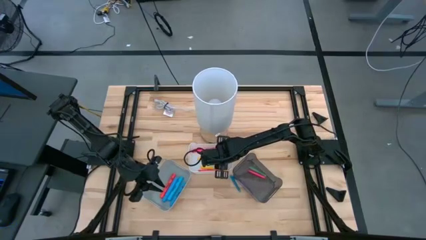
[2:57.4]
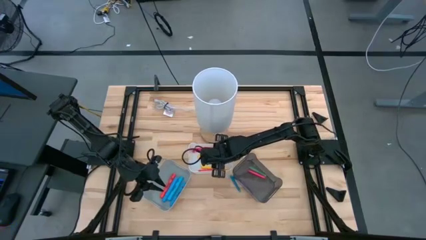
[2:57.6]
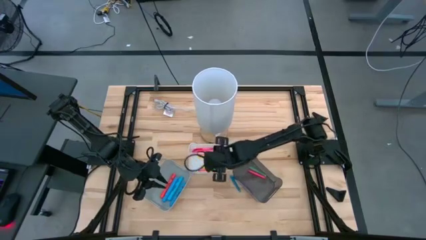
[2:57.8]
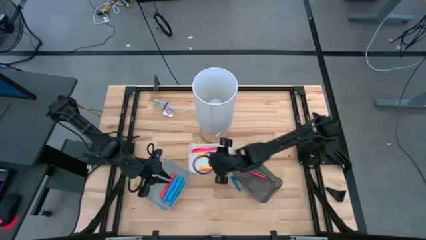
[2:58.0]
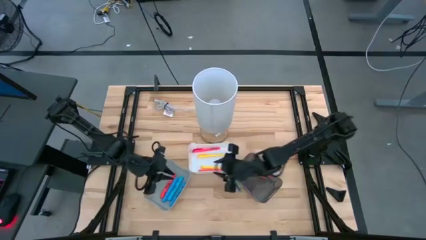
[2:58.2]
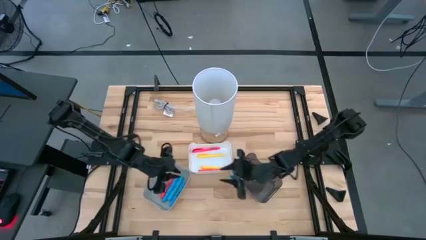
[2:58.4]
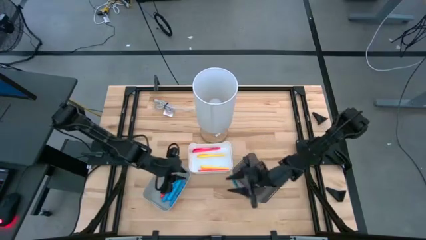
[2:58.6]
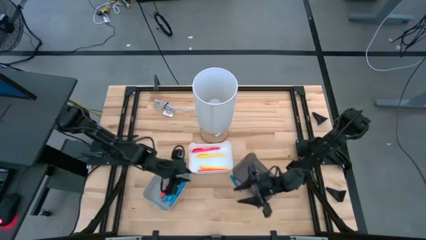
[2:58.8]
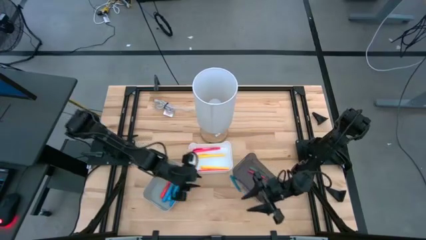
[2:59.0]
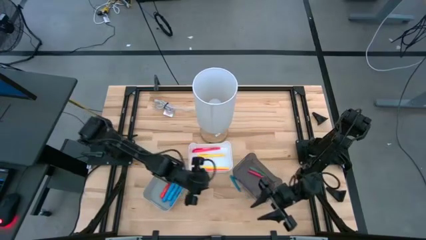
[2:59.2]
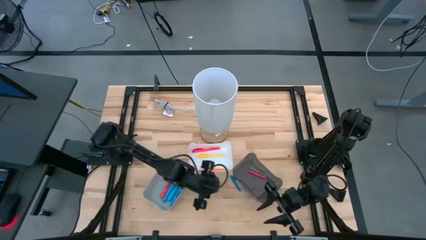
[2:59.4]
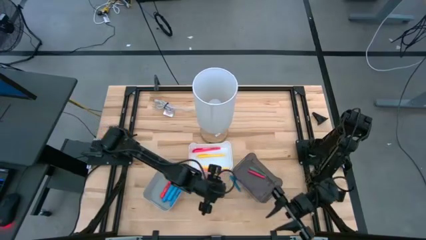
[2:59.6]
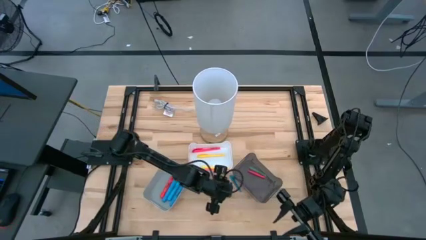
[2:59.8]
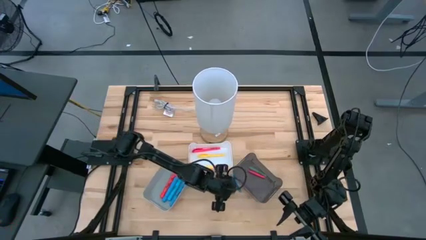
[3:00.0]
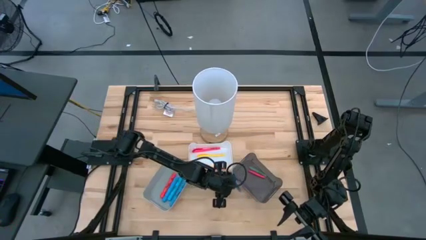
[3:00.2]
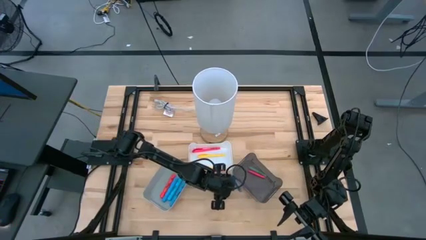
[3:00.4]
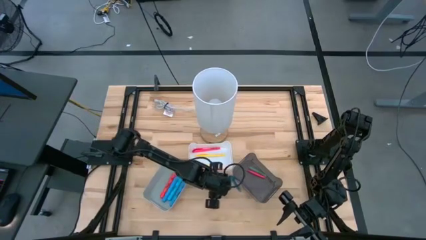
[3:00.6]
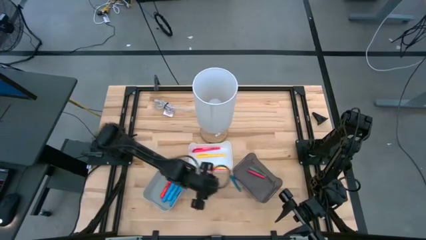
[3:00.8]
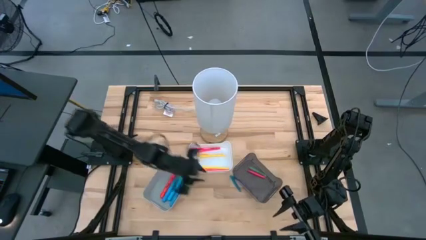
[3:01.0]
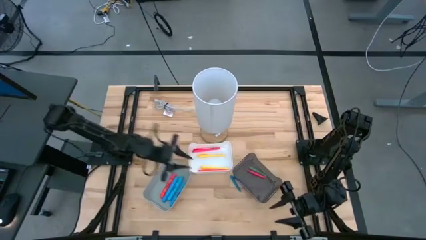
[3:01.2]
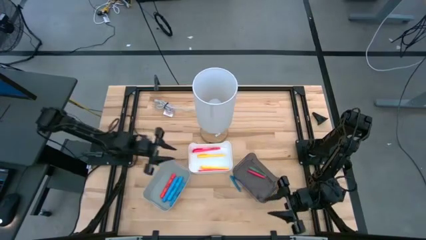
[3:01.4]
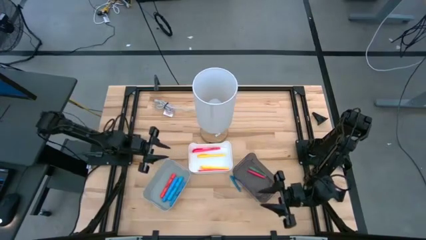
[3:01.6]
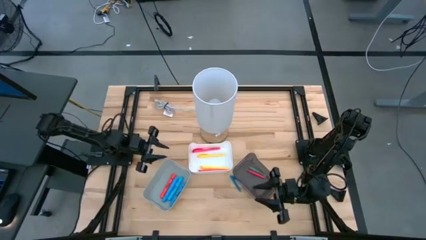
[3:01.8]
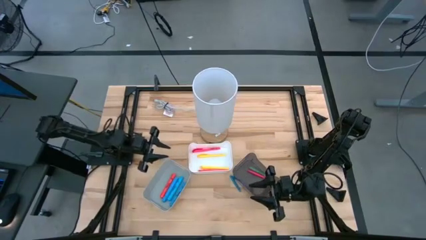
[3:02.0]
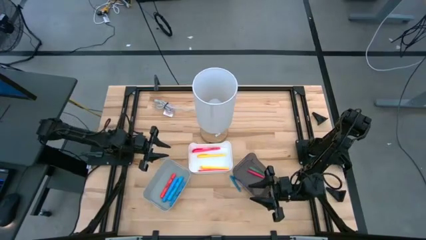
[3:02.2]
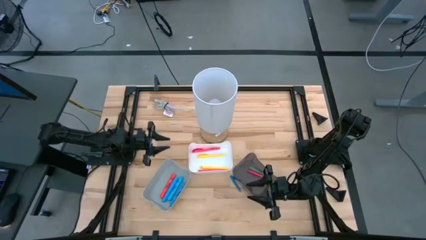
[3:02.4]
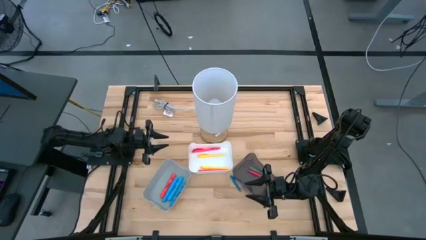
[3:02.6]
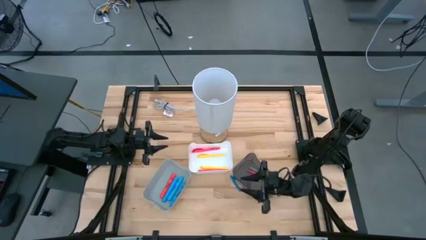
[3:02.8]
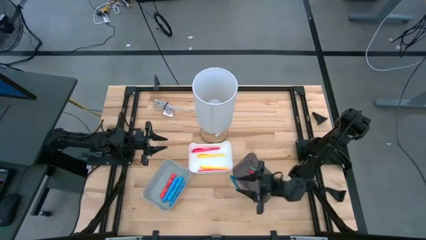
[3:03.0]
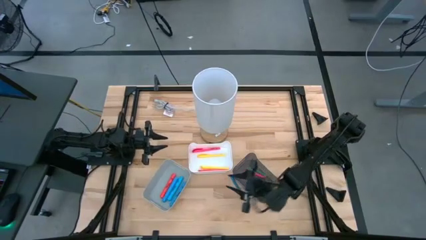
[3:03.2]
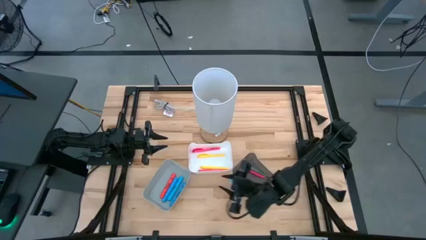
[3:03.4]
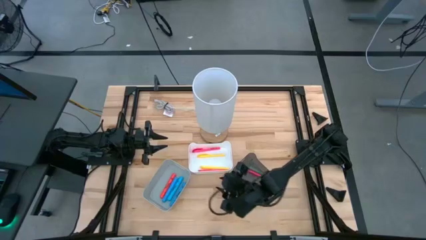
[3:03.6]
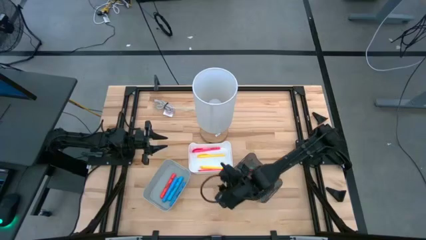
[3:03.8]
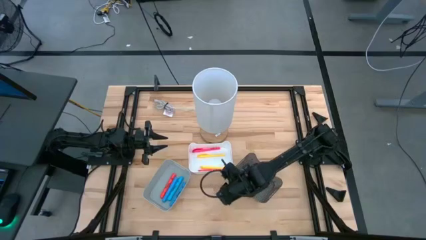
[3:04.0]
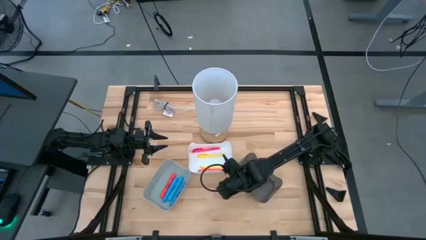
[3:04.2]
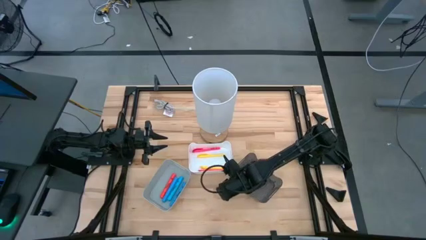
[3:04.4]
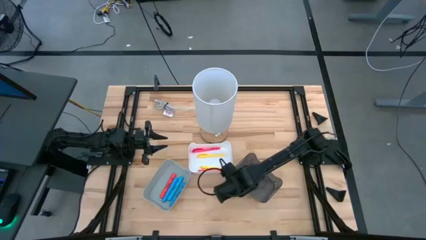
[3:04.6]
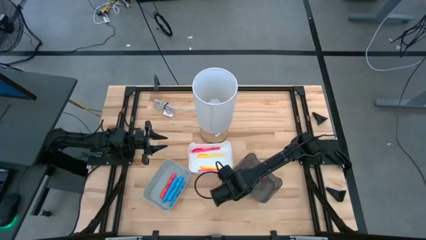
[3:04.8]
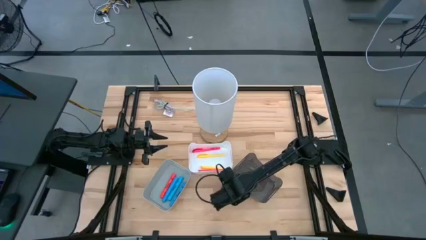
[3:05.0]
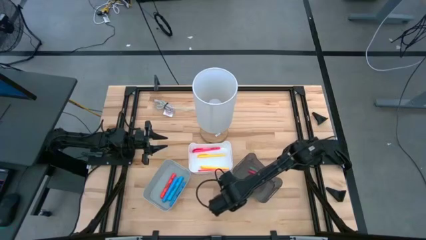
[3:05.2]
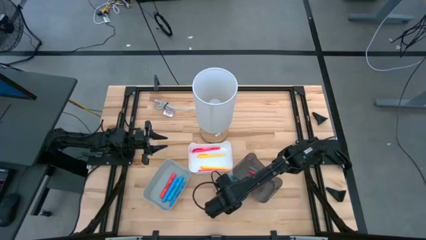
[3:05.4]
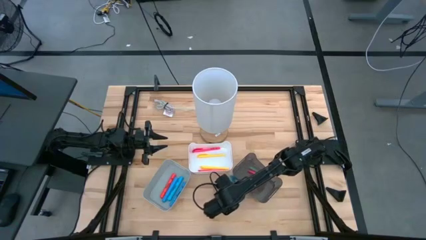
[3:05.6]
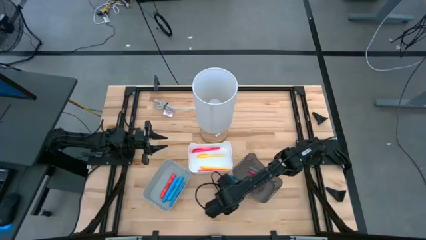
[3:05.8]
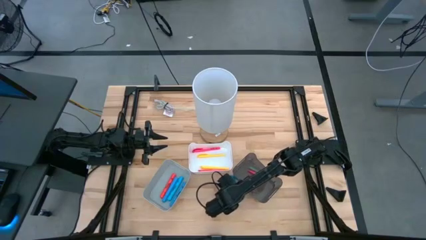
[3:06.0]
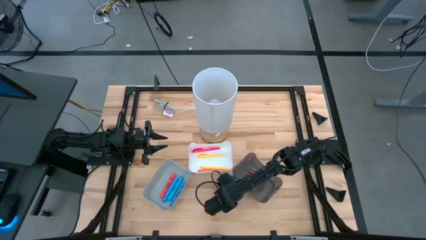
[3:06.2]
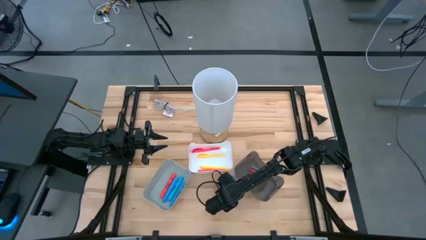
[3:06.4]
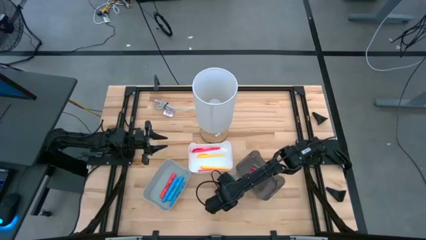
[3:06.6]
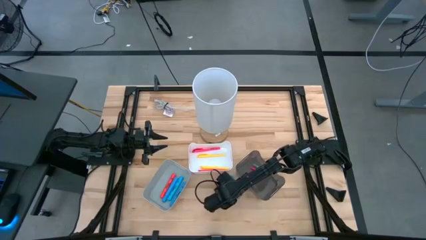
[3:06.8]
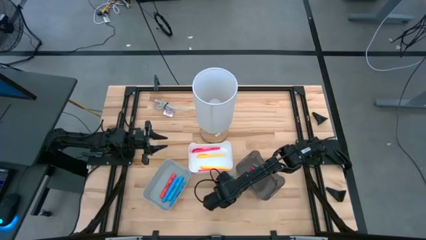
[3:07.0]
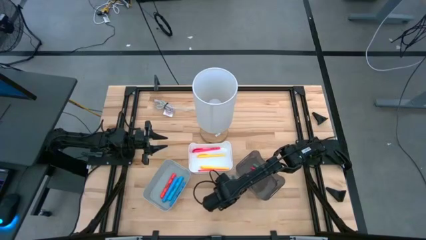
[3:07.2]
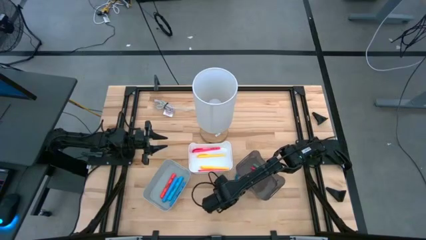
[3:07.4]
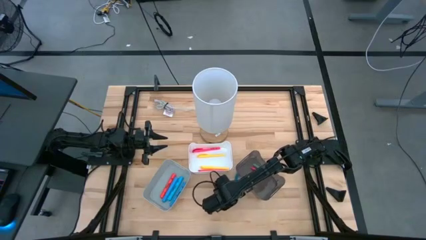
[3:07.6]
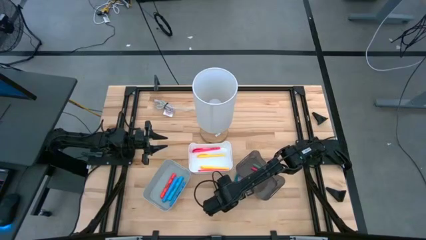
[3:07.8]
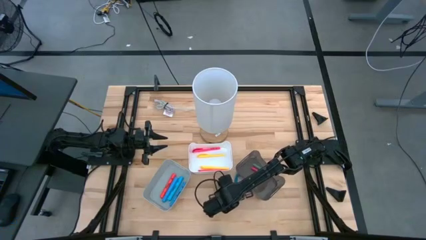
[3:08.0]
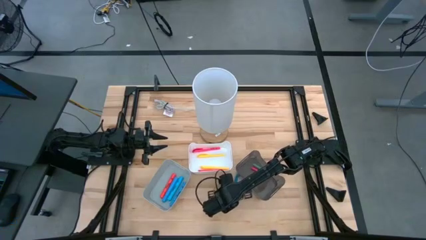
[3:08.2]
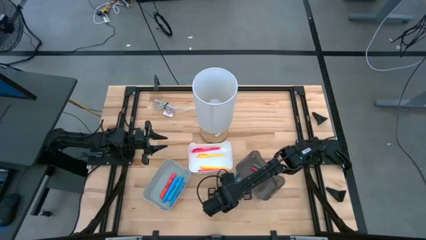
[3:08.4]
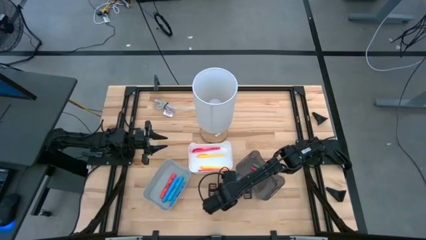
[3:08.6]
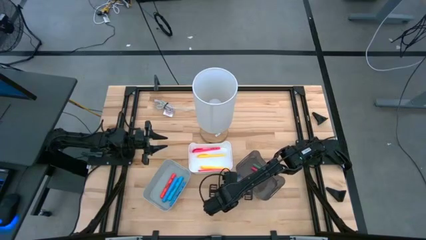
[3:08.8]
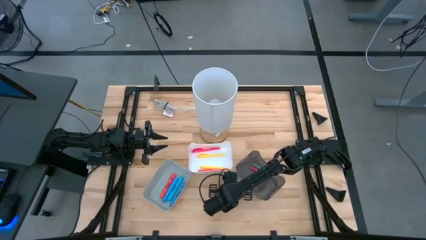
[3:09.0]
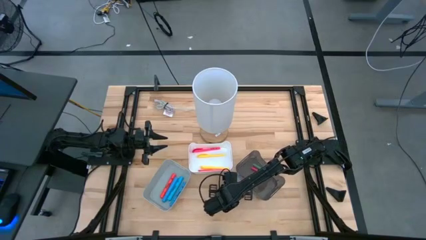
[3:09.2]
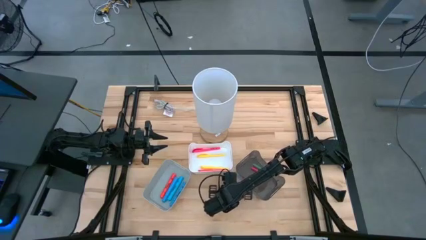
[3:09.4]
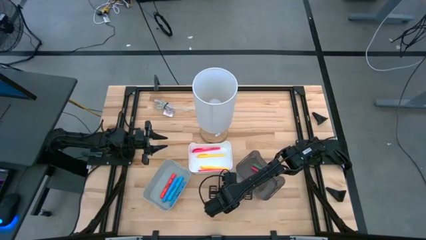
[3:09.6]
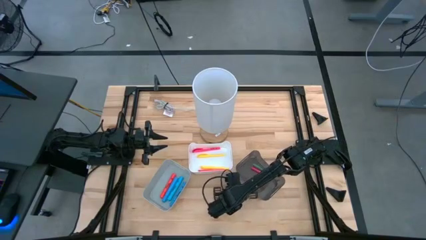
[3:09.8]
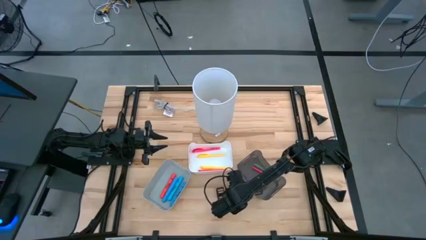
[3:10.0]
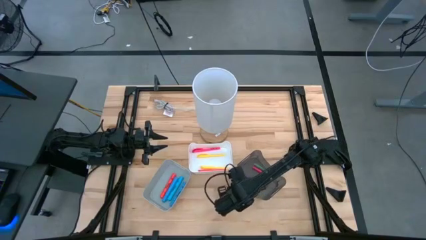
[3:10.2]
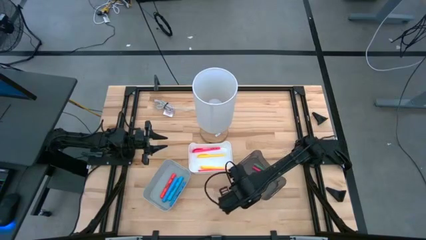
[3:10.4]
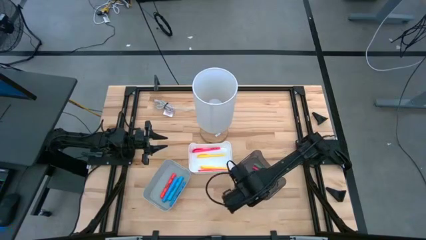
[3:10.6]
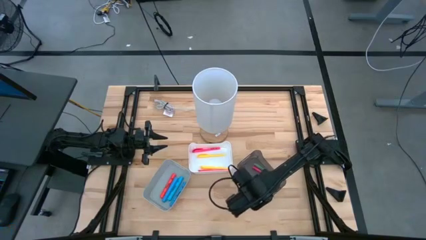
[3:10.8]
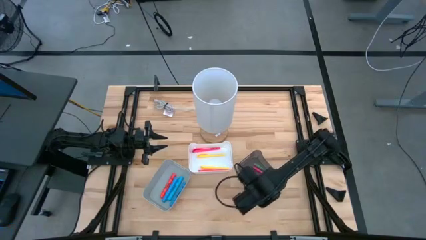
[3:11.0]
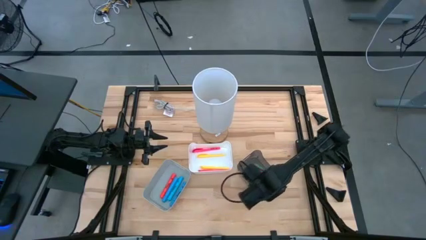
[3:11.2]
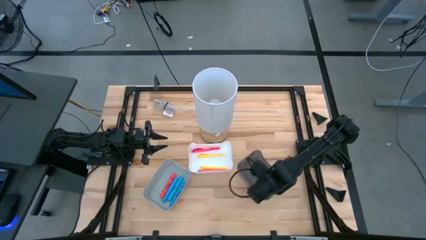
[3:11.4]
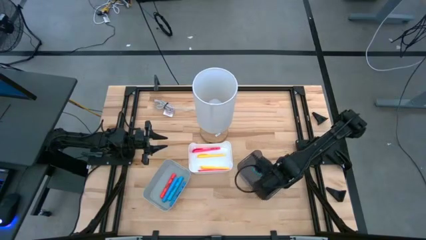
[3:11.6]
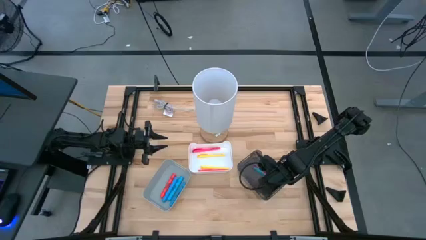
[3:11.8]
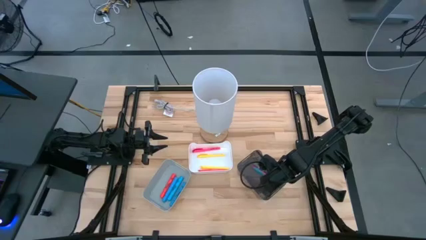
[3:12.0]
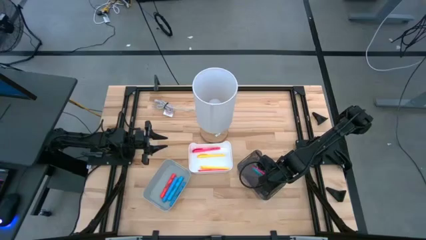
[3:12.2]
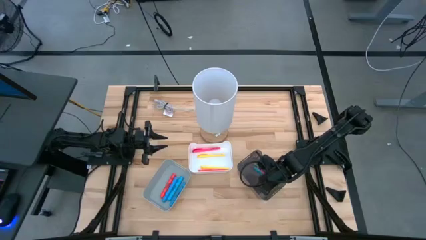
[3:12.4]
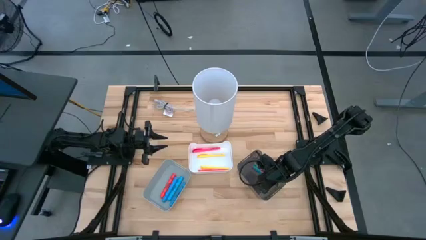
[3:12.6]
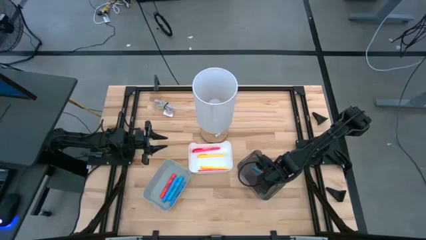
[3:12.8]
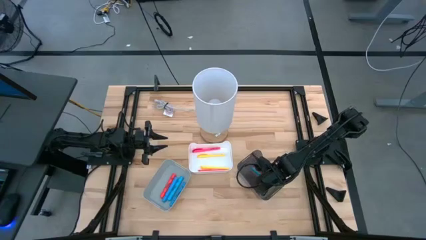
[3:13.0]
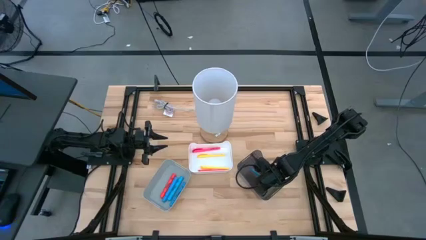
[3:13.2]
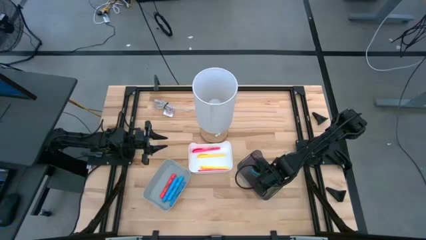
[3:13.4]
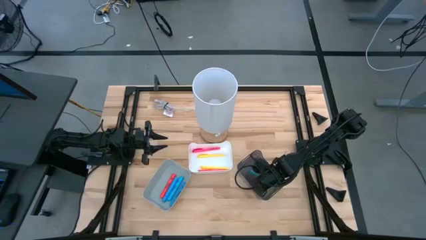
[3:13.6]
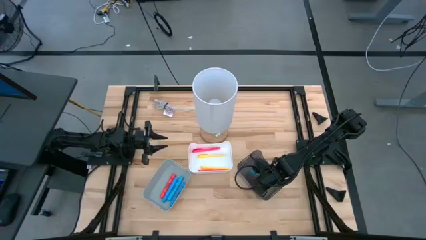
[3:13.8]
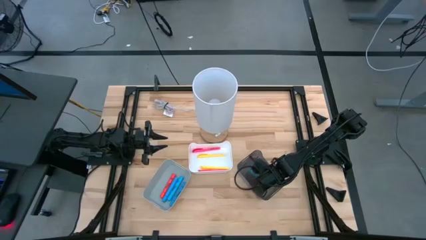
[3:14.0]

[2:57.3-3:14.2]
Task: Pick & Place Markers
Put the blue pen in the black bin

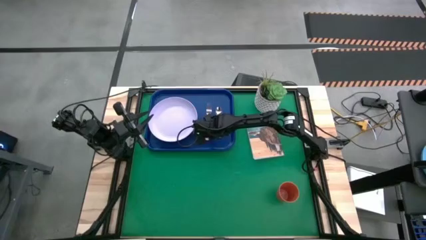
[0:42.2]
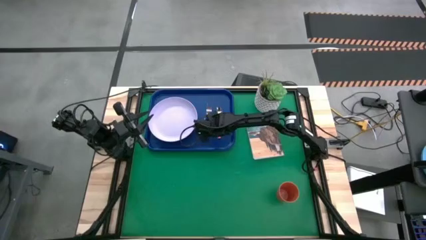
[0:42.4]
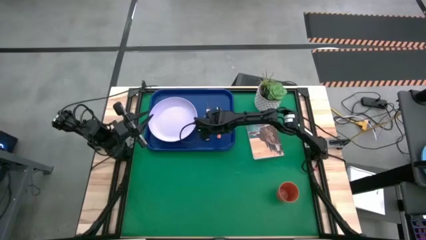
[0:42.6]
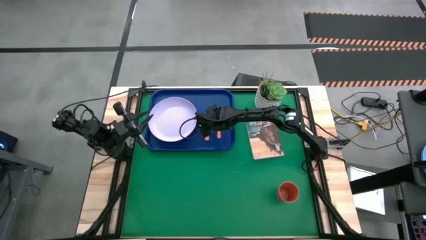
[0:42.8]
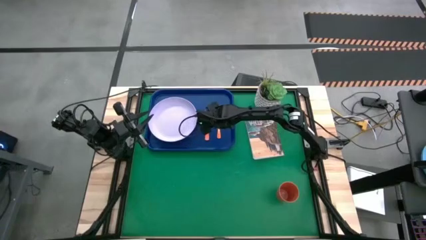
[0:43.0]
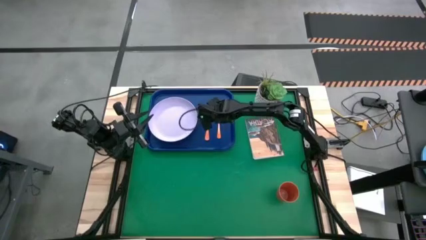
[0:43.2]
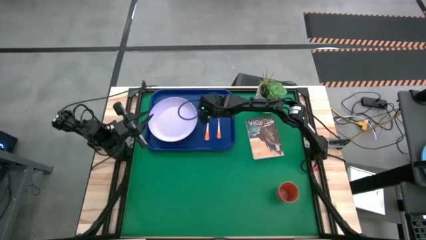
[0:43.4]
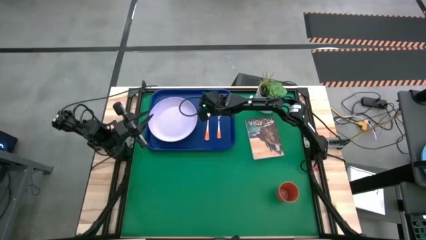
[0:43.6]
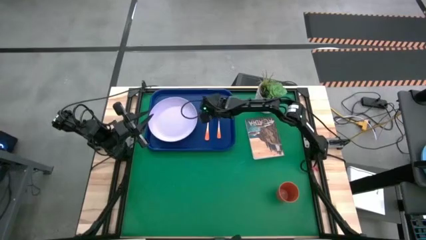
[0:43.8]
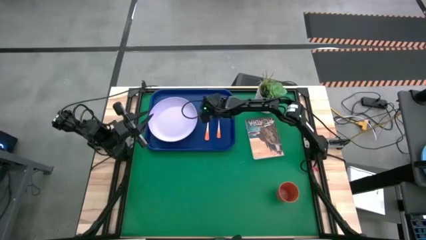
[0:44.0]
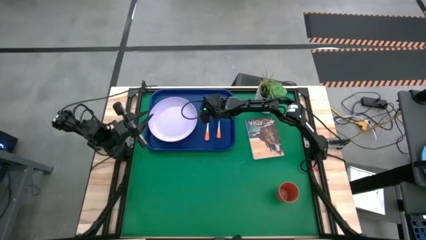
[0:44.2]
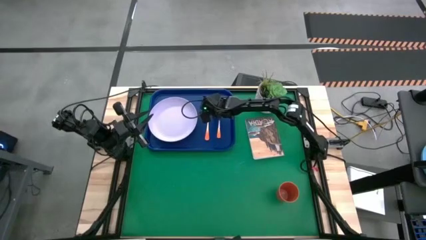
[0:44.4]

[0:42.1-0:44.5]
Task: Pick and place plate/cup/fork/spoon on tray
Adjust the orange spoon on the blue serving tray
